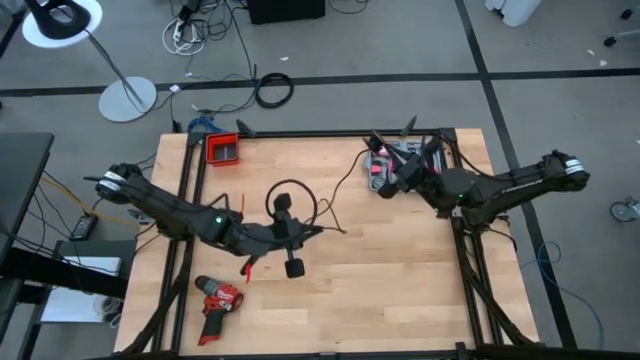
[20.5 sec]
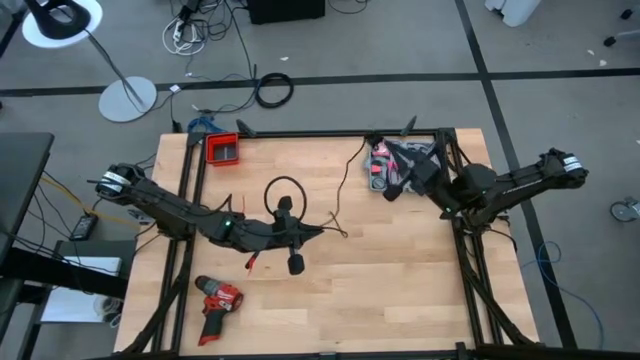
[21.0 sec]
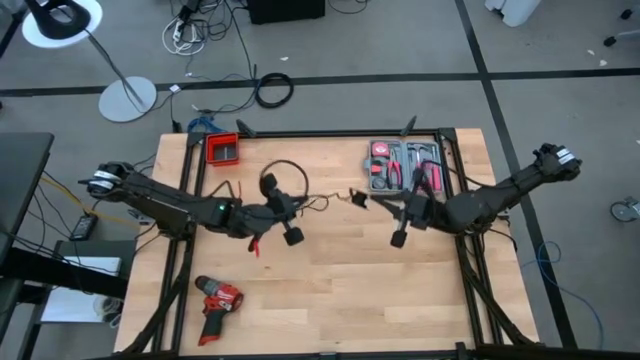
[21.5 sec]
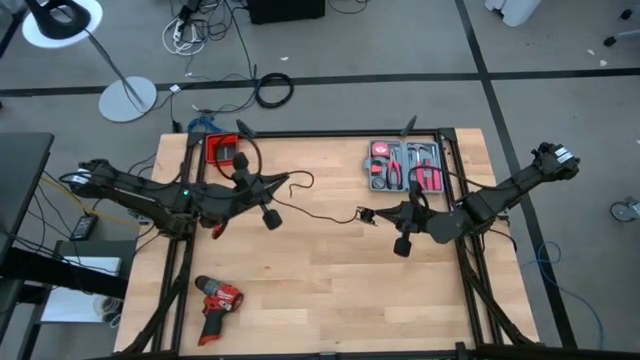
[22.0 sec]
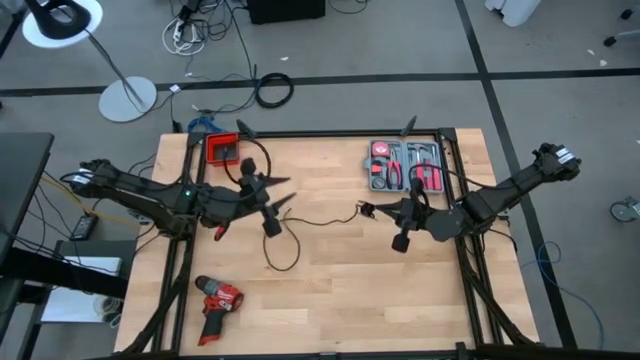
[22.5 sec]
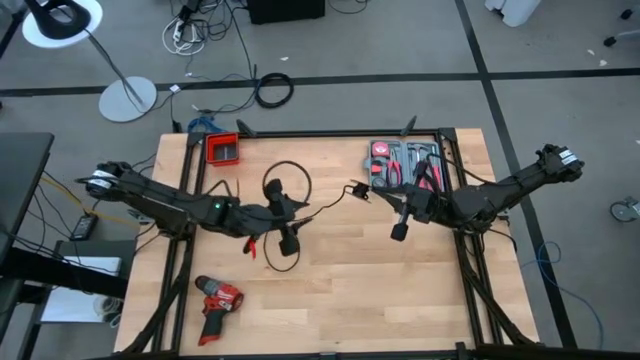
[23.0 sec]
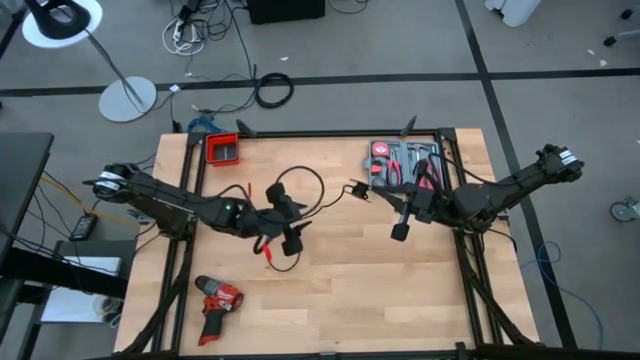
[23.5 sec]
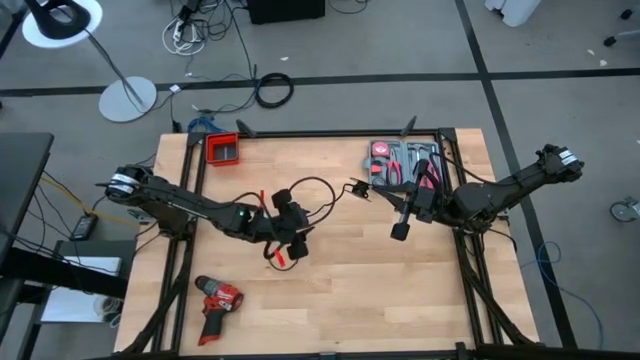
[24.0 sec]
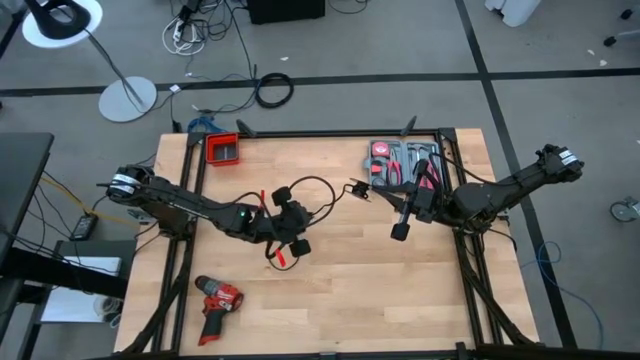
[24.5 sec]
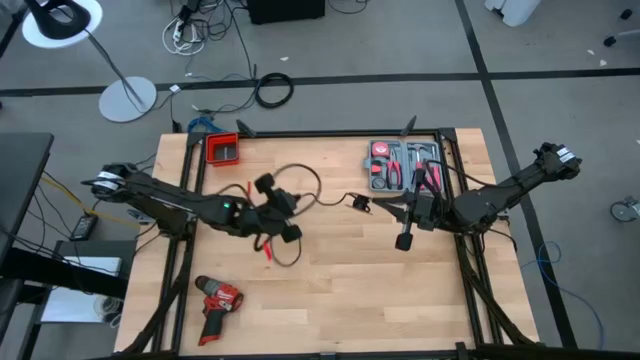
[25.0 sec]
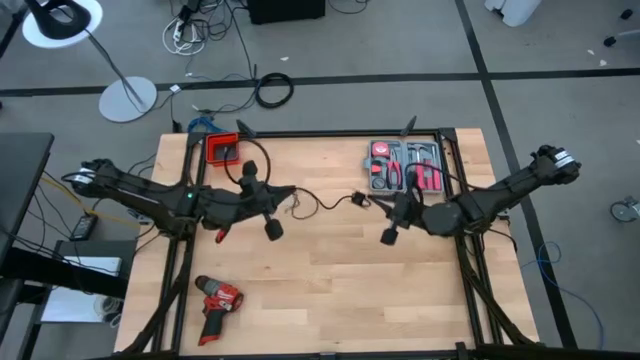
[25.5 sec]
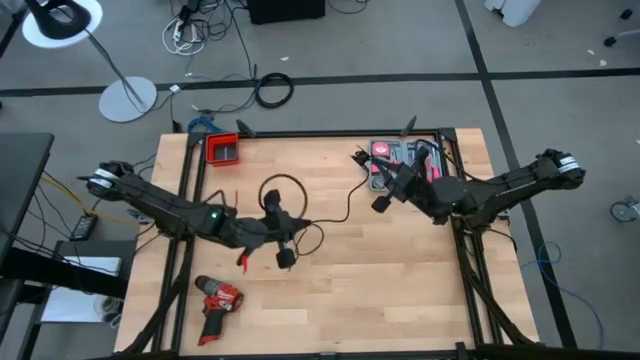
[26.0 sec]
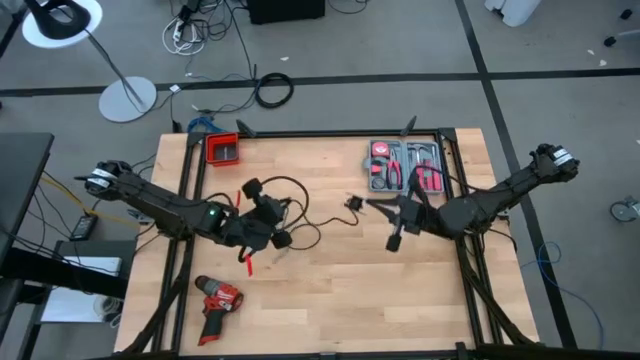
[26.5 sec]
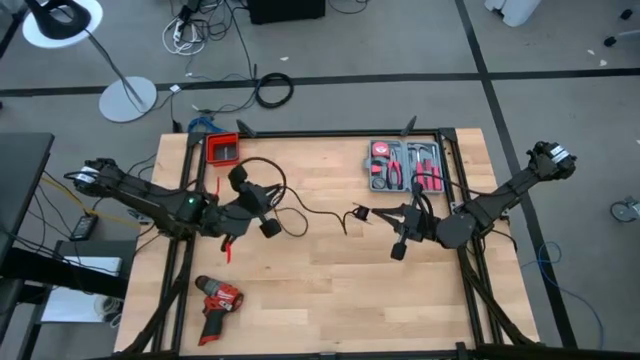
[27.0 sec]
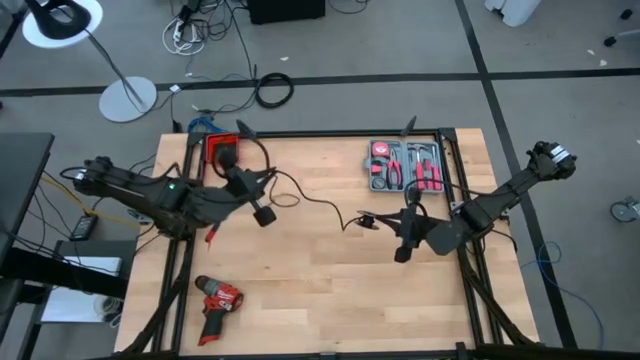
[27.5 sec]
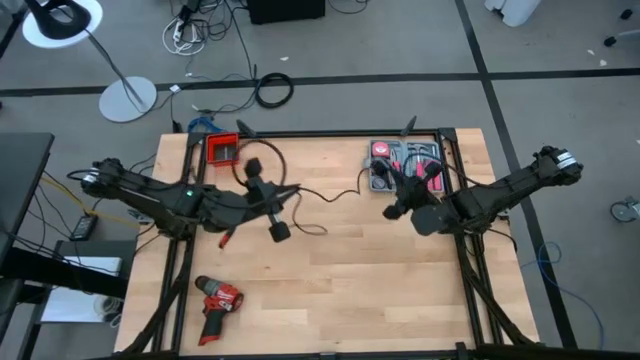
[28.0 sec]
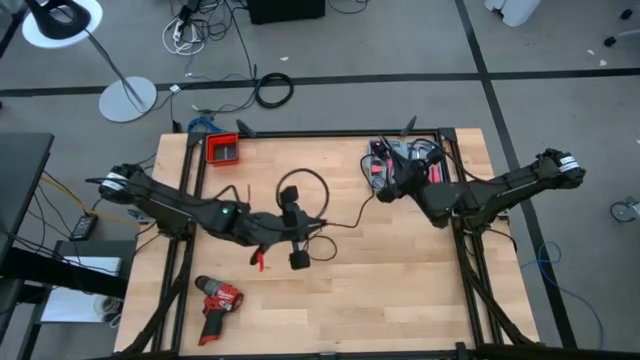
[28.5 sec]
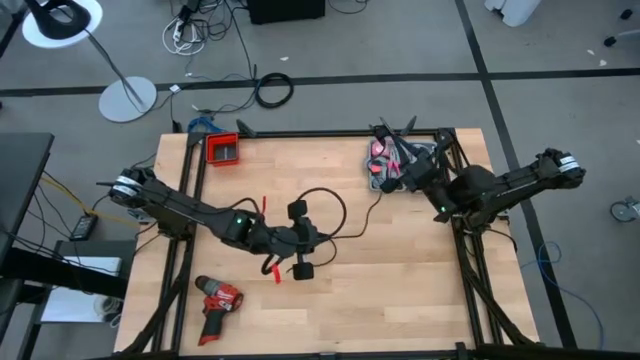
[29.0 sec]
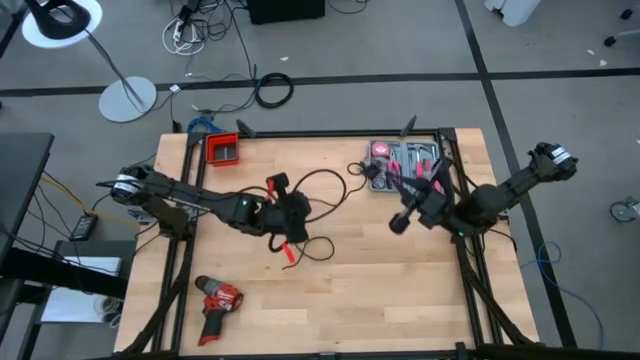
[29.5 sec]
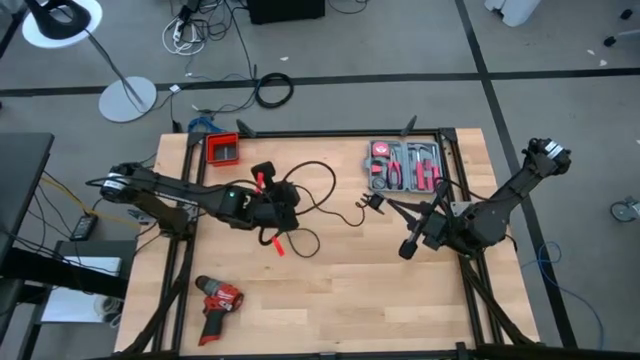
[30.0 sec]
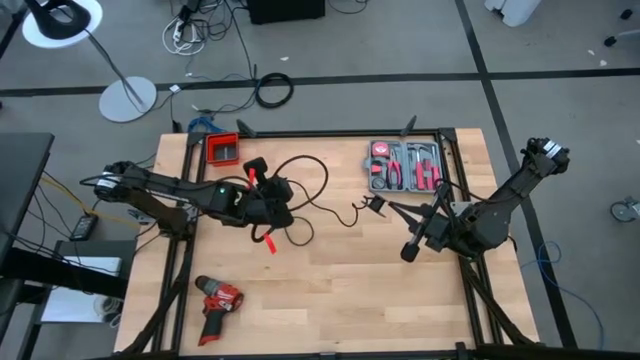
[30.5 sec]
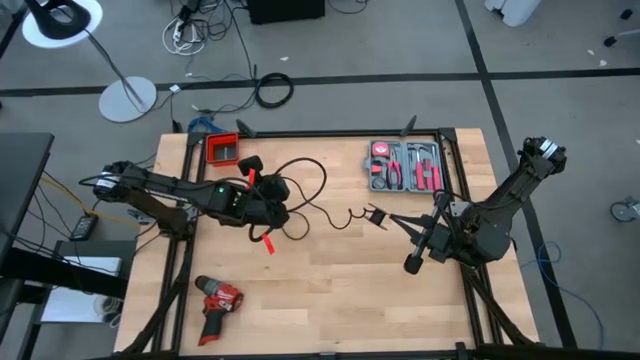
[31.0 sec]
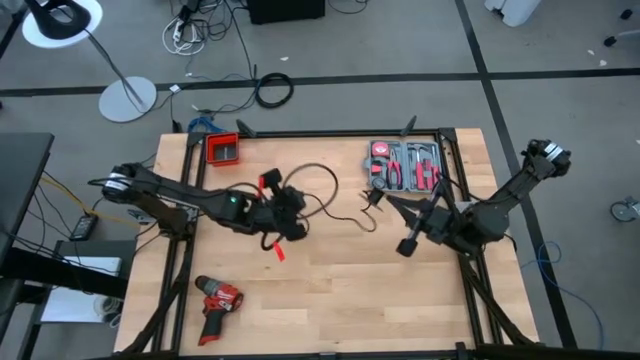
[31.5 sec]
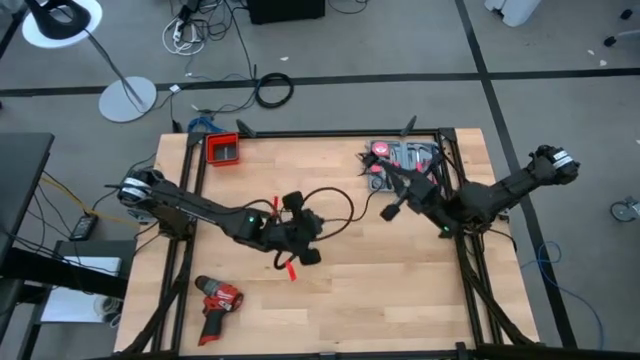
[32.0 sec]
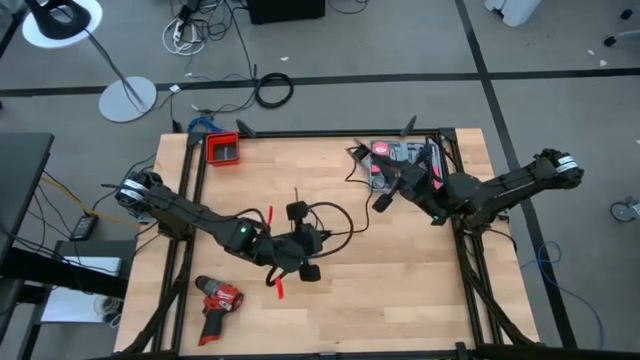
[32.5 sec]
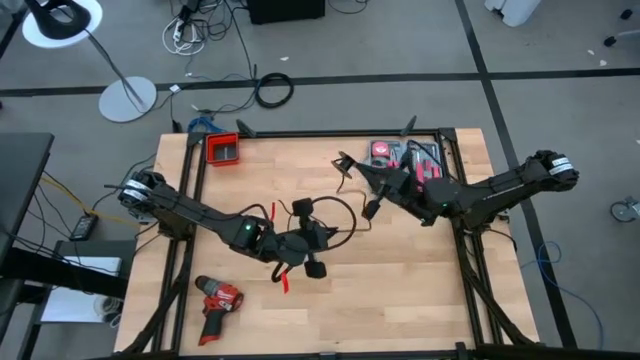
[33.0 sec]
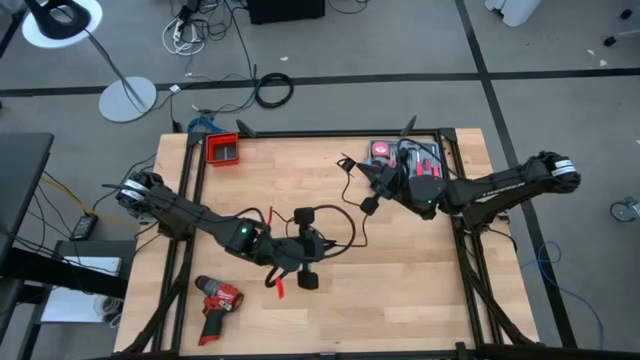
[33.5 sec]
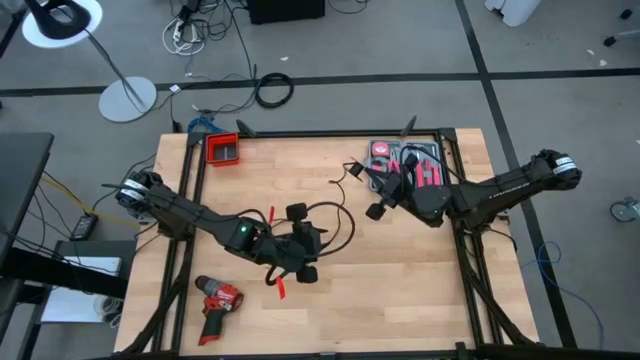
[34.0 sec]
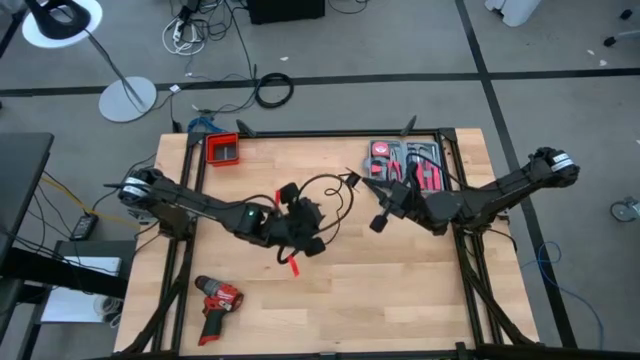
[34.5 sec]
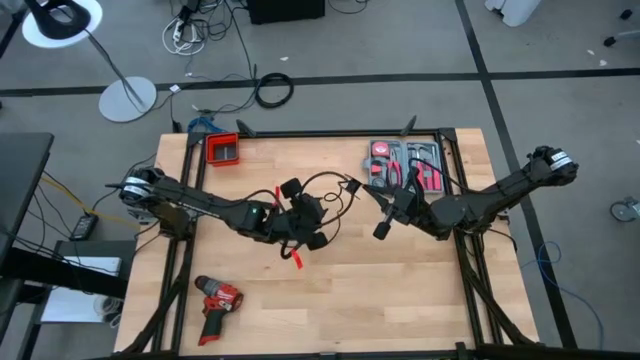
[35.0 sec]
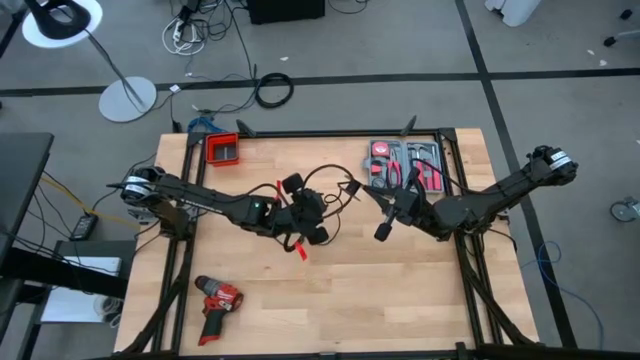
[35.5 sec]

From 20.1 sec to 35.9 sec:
Task: Coil cords
Uncoil the black wire from the black spool
